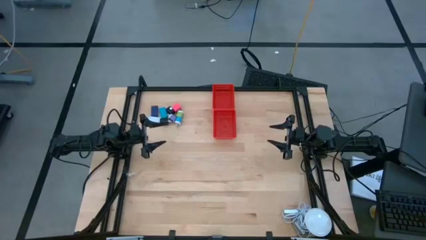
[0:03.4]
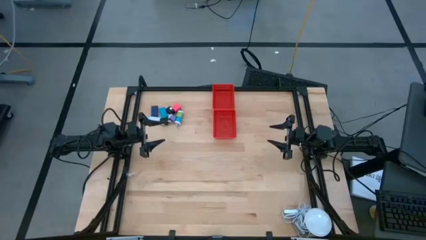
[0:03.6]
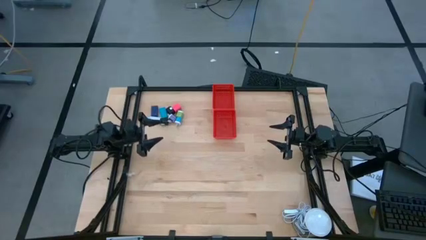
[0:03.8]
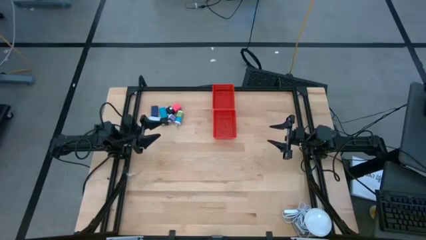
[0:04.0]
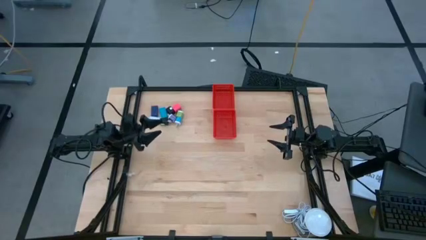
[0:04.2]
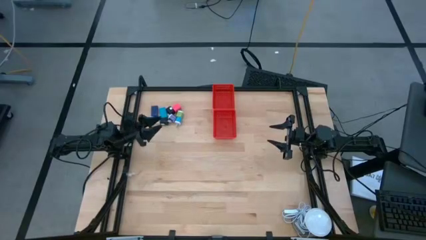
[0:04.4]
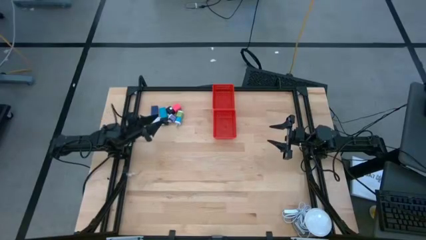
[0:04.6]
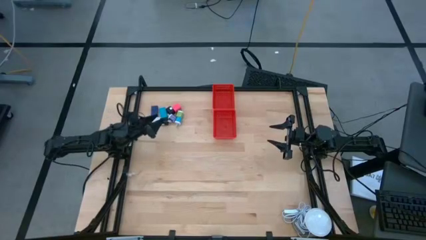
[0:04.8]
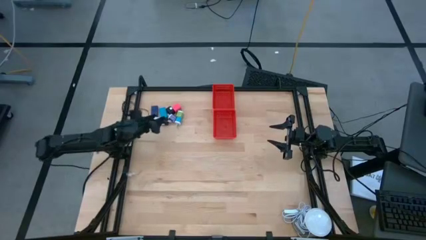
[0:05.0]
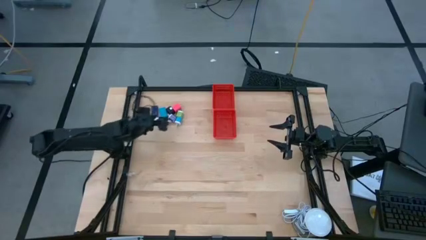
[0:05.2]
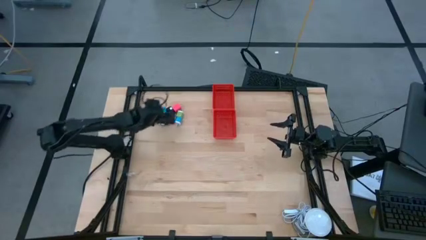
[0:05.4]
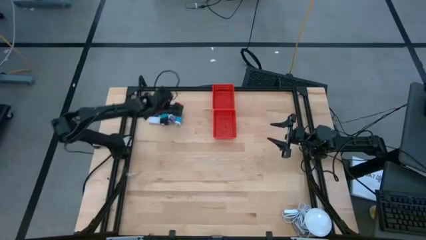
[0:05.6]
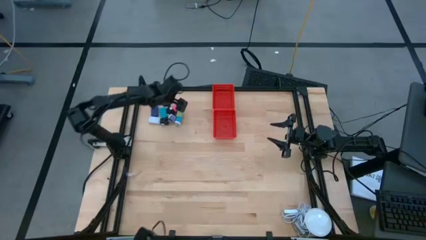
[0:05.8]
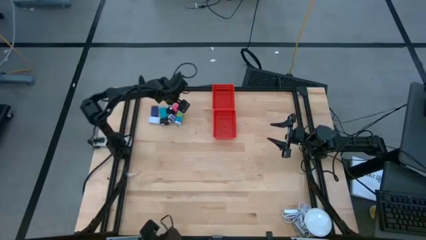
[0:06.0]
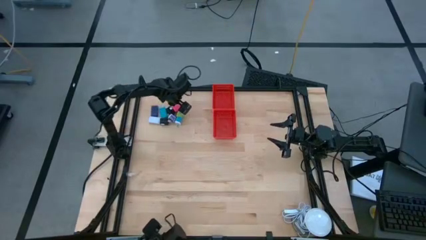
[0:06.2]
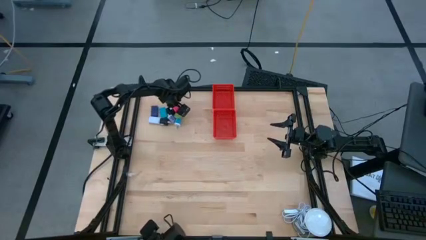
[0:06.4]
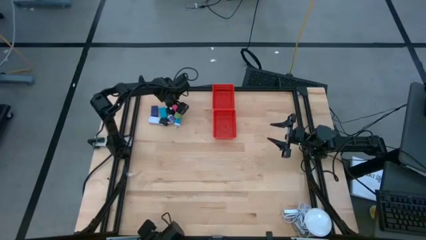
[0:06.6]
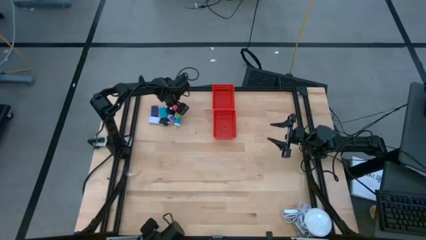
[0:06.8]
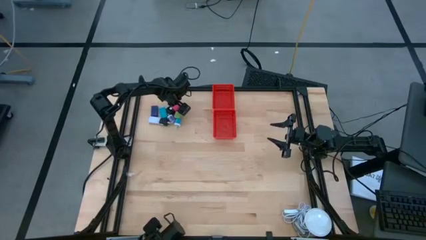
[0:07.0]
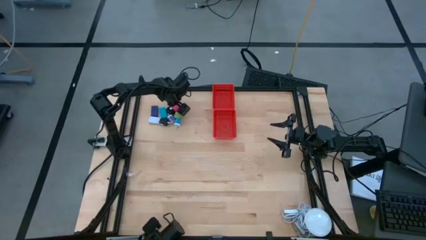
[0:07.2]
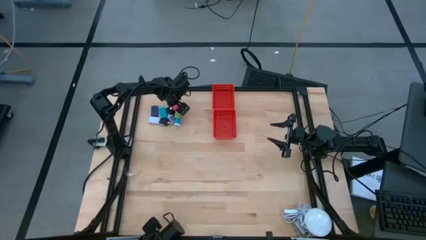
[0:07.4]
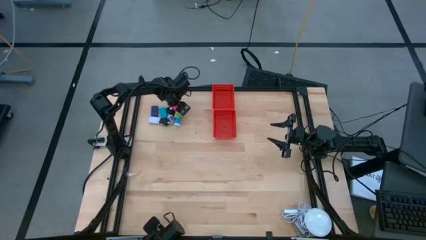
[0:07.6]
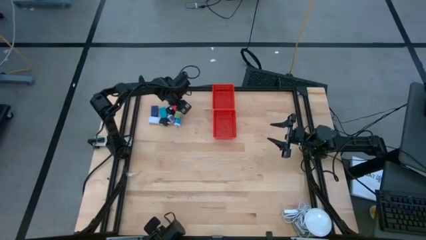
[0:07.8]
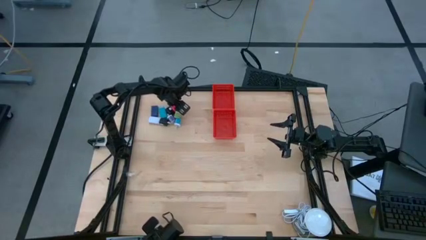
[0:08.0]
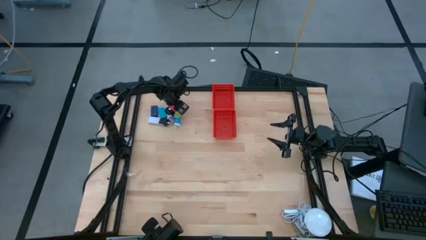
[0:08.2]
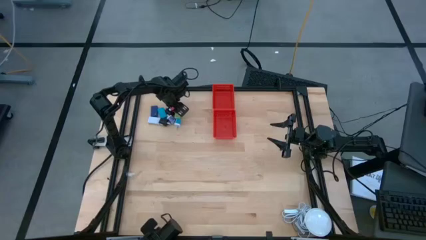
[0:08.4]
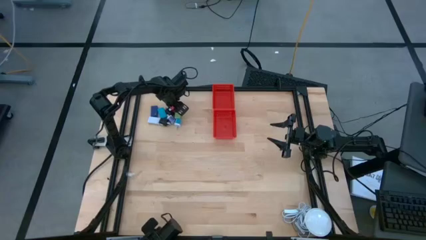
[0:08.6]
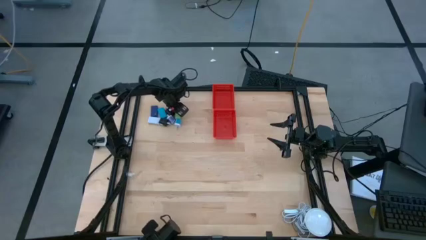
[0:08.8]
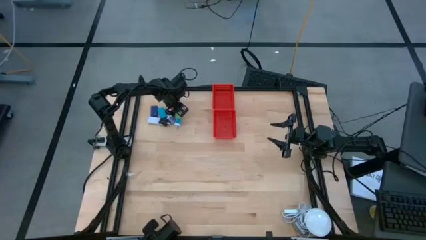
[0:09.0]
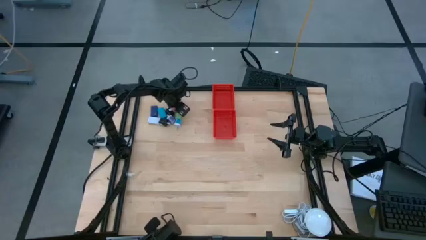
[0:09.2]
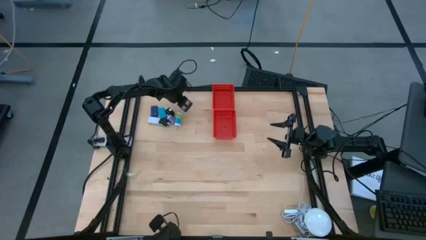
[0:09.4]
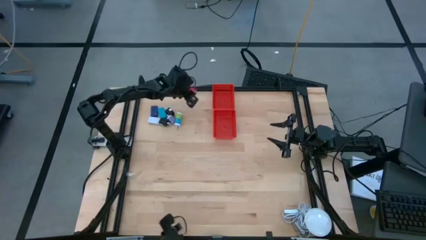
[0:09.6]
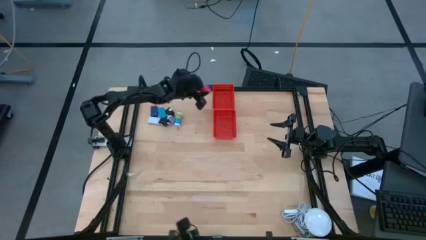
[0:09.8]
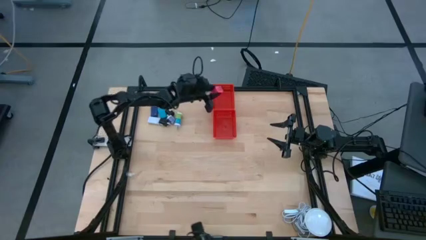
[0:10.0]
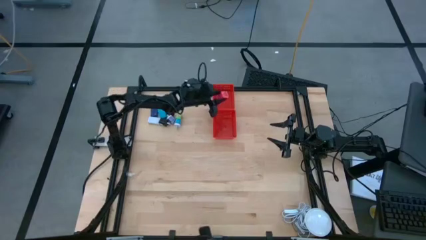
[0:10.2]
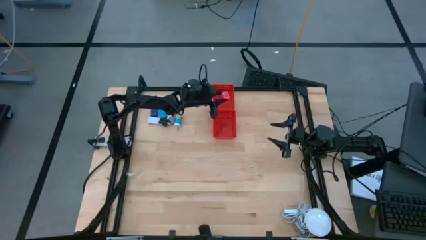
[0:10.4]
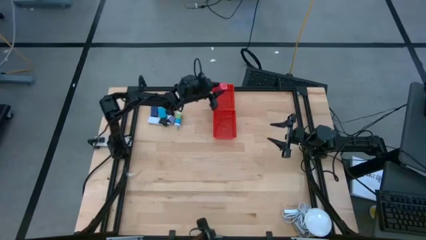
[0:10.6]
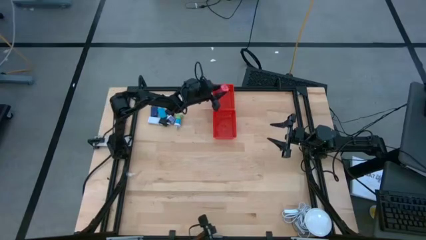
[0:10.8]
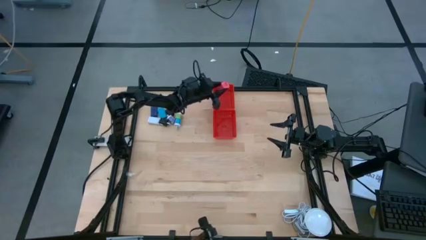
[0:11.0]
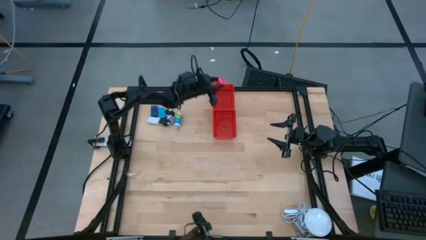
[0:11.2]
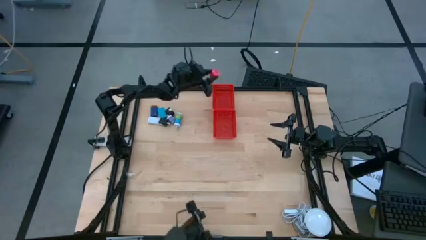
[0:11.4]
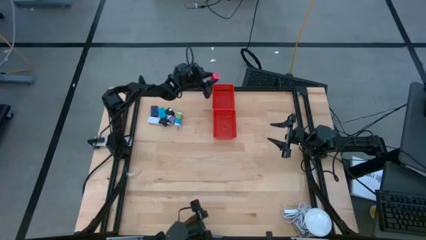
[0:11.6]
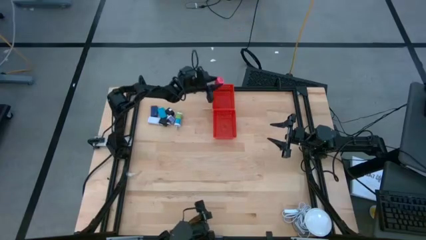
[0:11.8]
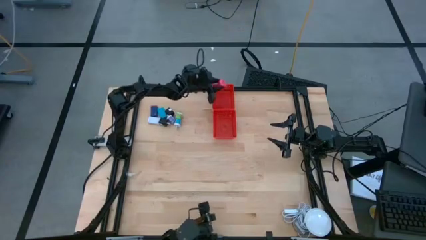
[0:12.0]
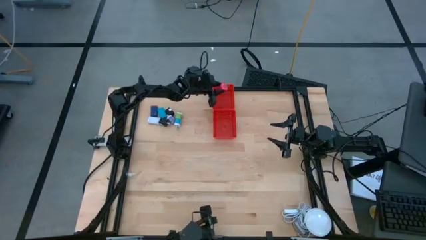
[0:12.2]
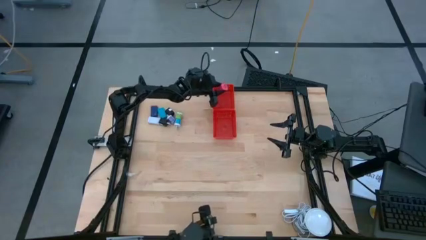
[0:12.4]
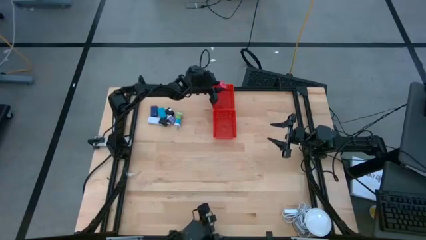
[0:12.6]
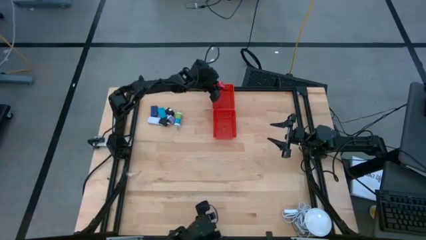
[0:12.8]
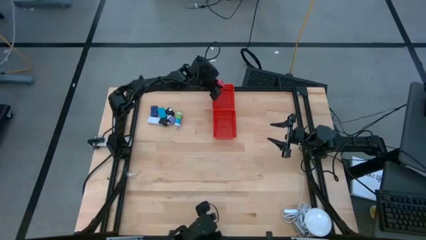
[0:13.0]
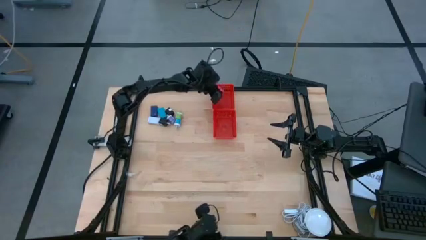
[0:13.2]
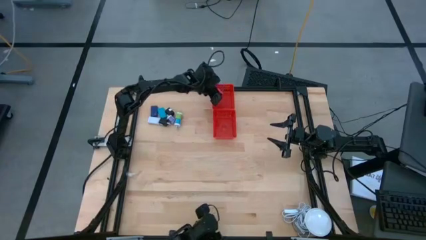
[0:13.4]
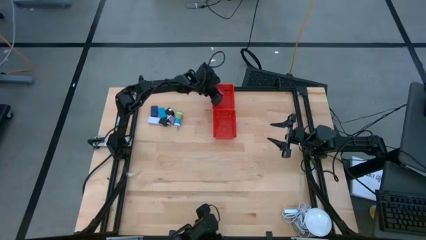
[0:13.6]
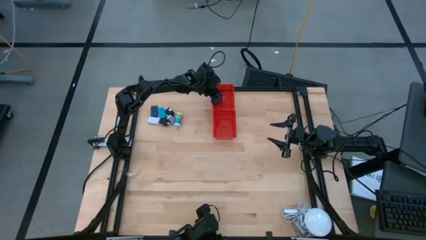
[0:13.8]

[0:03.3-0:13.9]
Task: Pick & Place Office items
Put the pink charger adapter into the top red basket
